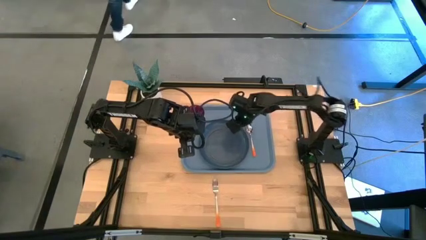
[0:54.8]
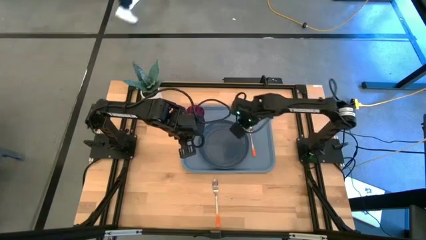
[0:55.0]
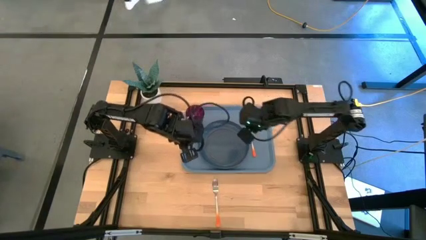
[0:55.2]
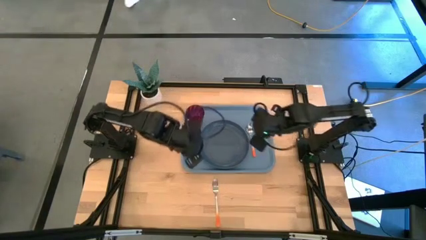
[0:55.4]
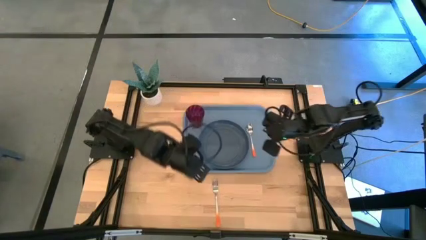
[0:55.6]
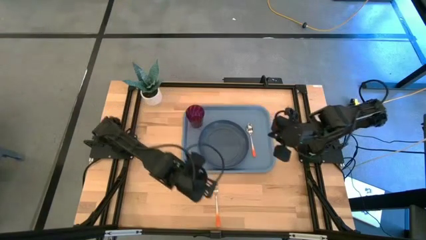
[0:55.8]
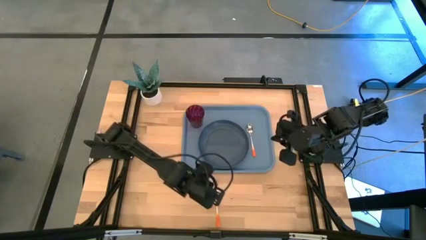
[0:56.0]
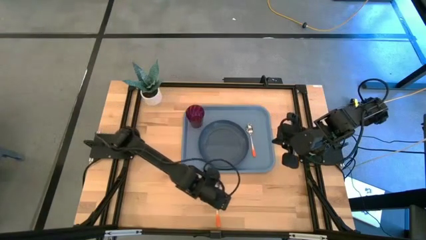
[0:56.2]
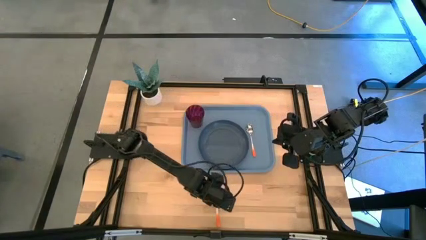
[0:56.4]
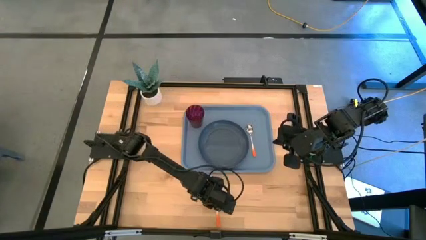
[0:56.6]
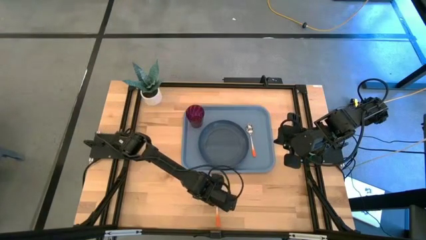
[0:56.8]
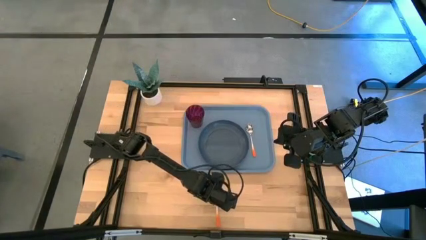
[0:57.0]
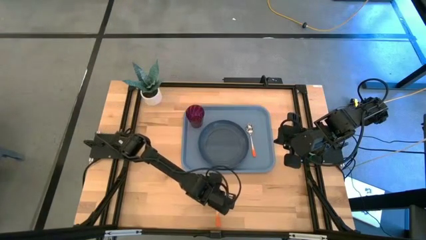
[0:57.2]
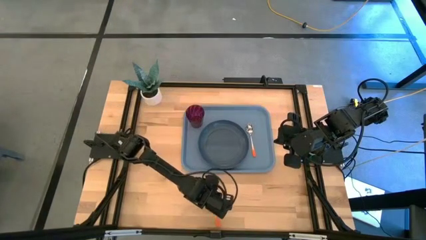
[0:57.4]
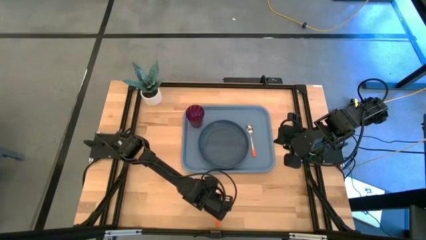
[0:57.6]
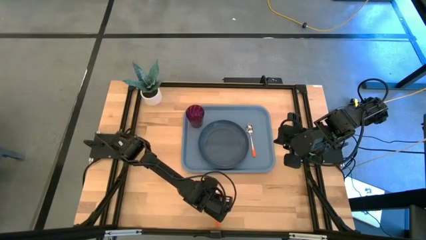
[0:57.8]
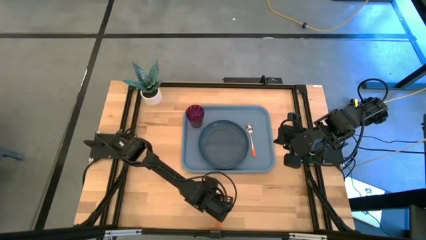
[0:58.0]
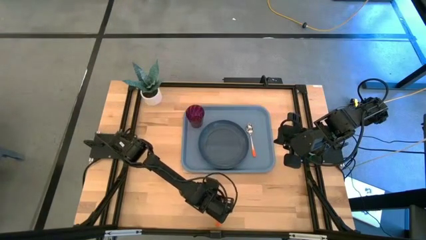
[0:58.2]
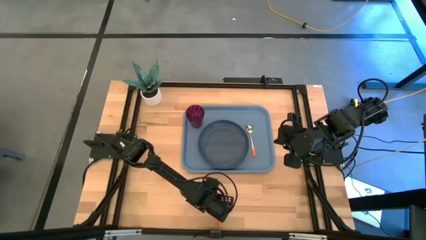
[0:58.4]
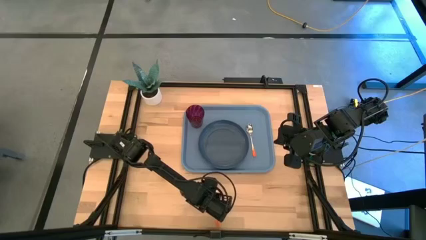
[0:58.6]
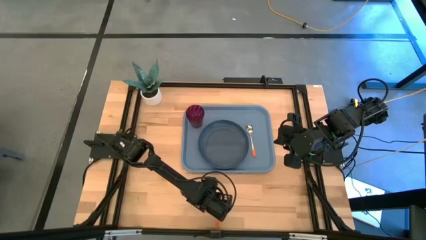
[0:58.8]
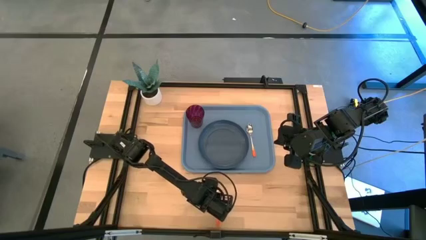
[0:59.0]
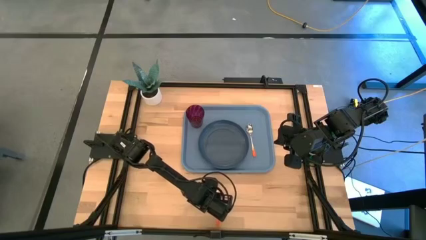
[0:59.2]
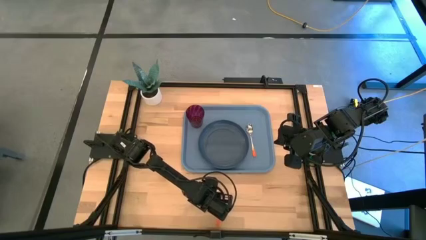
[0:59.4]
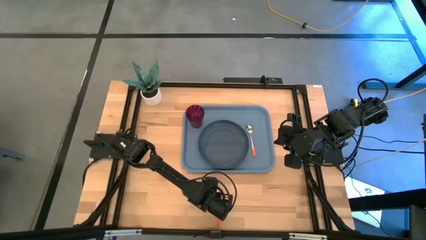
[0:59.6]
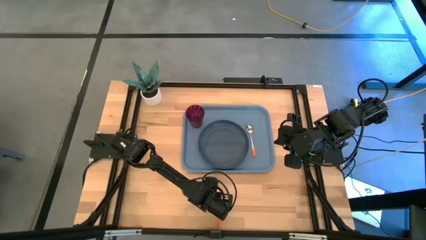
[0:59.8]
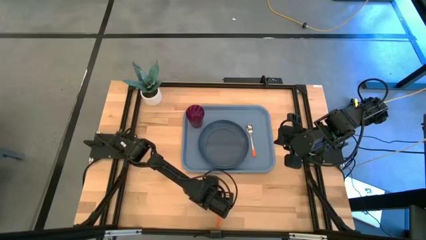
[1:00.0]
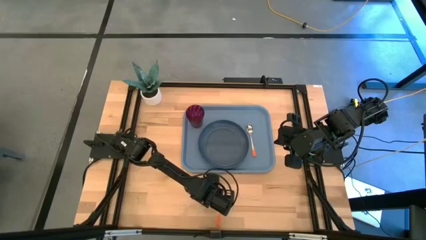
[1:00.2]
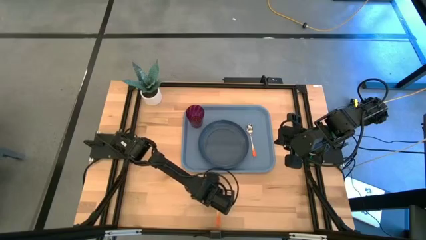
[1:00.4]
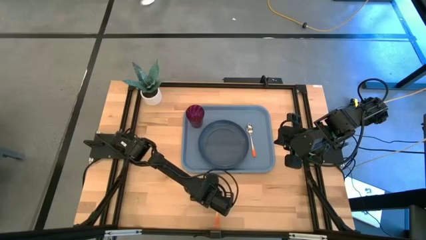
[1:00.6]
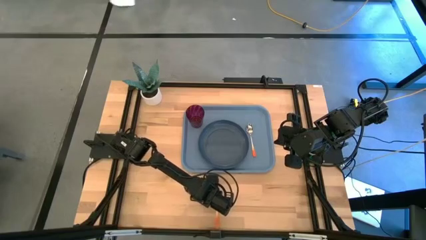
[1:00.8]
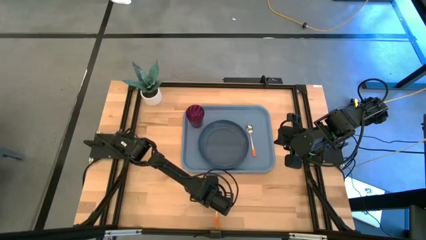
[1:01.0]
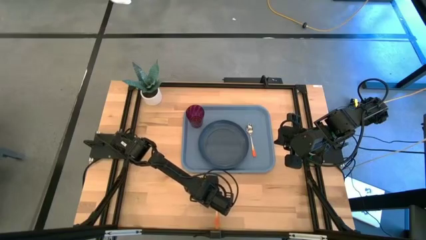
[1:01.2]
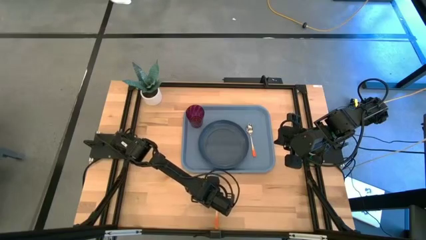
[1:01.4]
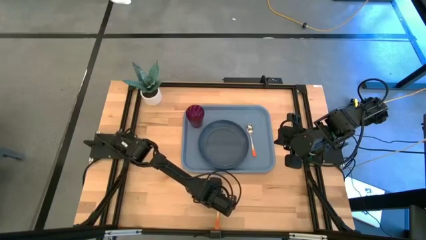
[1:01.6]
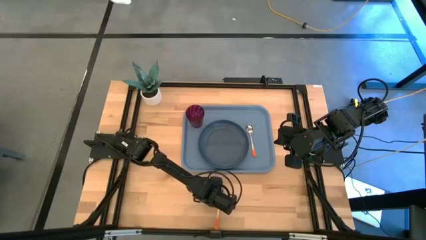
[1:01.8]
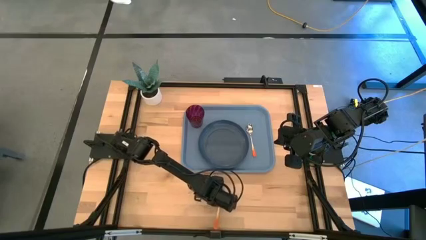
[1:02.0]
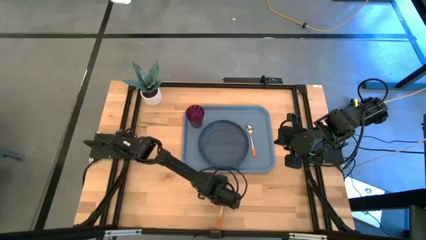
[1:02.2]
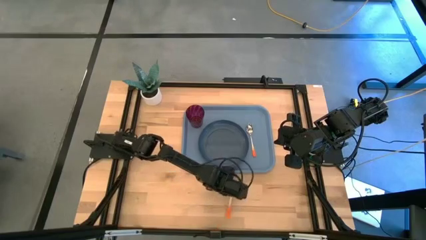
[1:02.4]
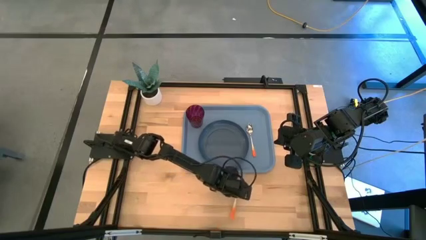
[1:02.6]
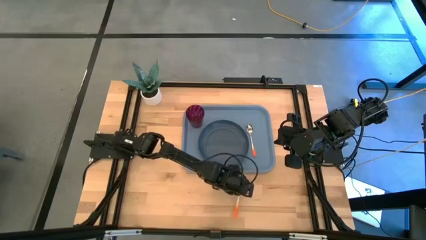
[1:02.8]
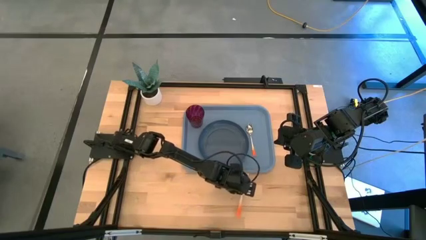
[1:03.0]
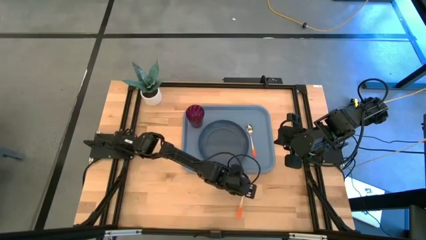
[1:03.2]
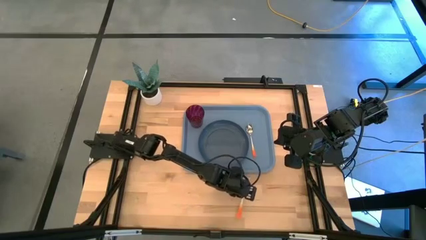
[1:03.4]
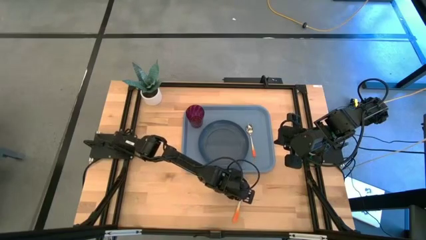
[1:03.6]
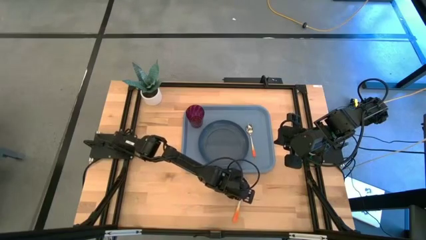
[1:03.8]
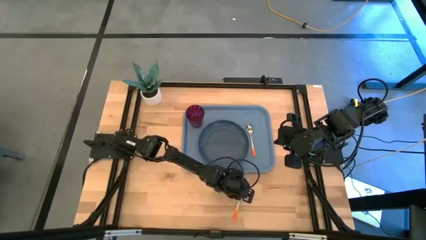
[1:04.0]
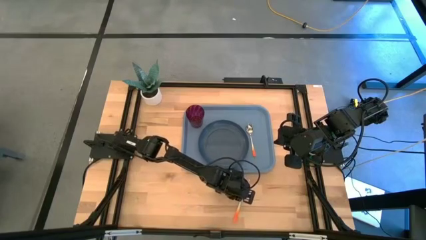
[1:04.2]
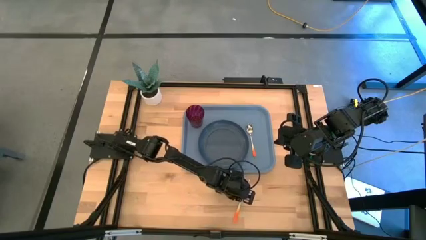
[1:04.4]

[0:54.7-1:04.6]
Task: Pick and place plate/cup/fork/spoon on tray
Put the orange fork to the right of the orange spoon on the light blue tray

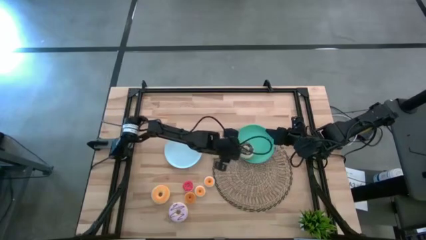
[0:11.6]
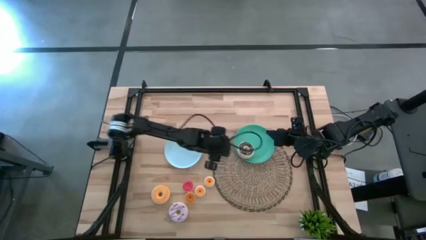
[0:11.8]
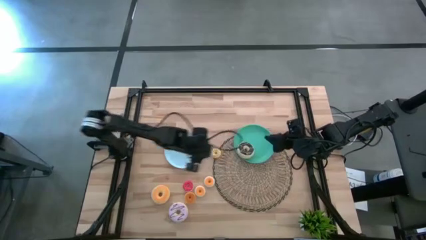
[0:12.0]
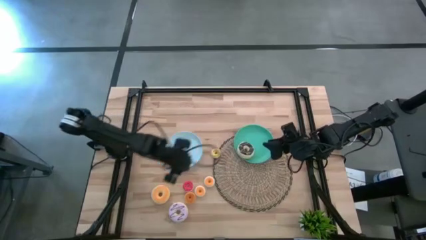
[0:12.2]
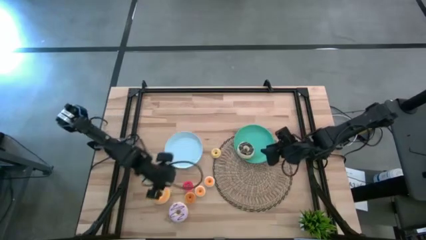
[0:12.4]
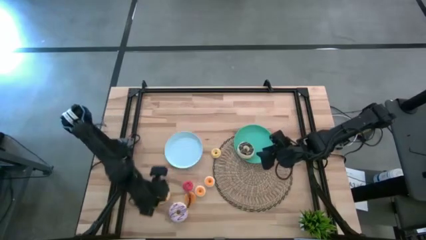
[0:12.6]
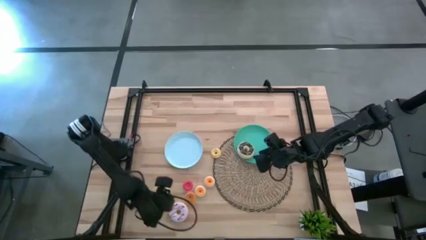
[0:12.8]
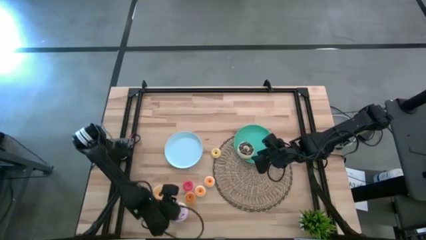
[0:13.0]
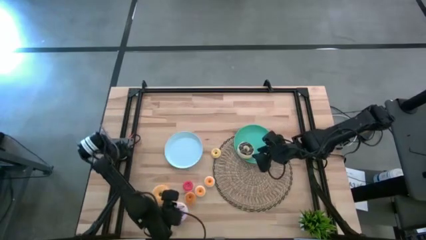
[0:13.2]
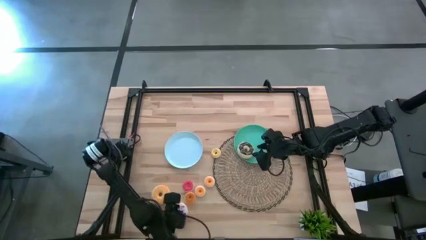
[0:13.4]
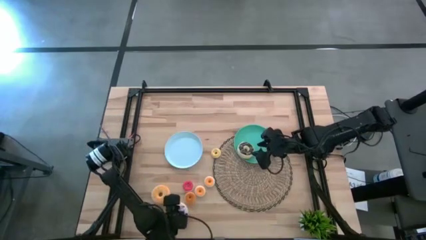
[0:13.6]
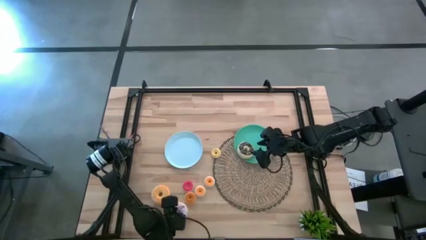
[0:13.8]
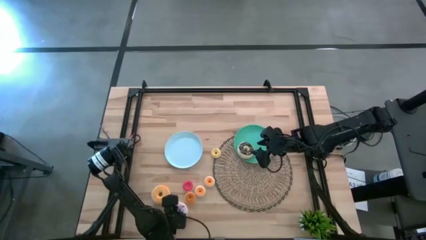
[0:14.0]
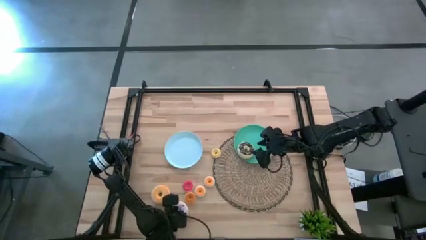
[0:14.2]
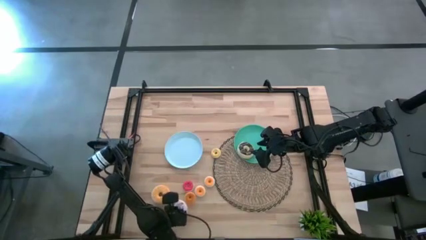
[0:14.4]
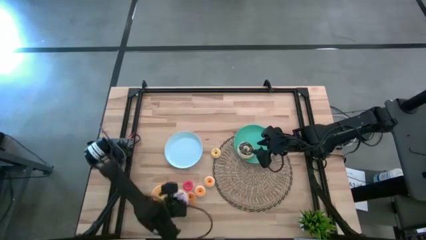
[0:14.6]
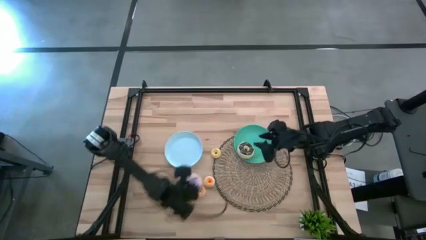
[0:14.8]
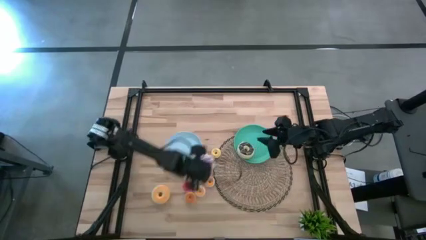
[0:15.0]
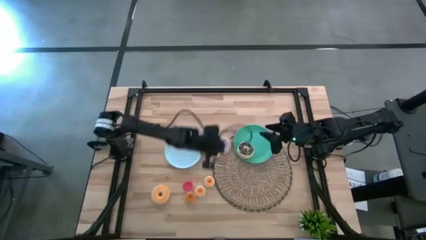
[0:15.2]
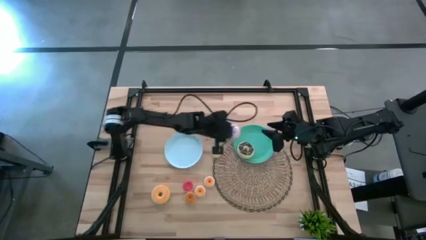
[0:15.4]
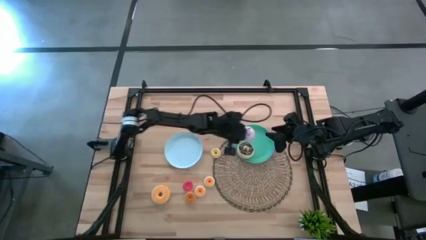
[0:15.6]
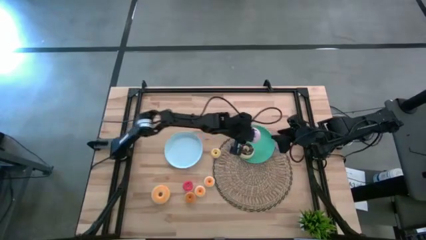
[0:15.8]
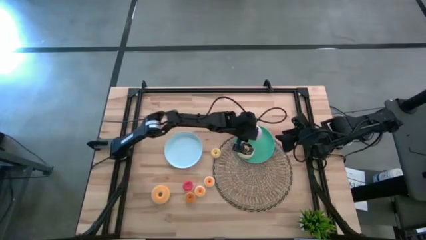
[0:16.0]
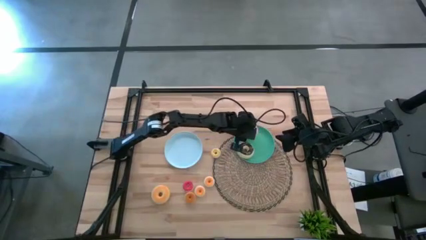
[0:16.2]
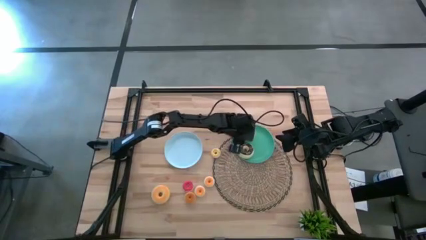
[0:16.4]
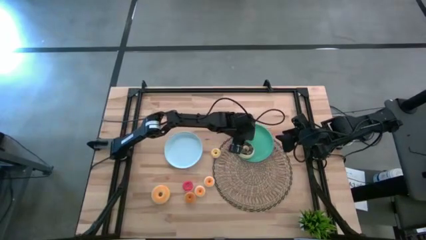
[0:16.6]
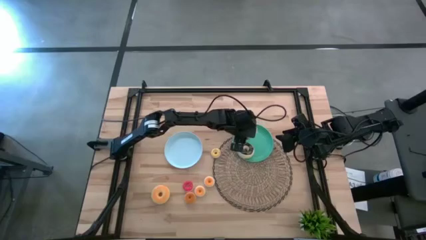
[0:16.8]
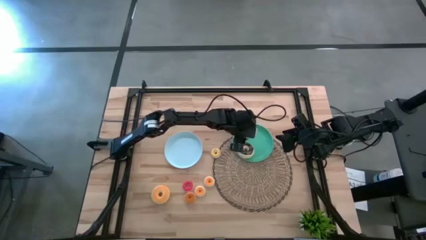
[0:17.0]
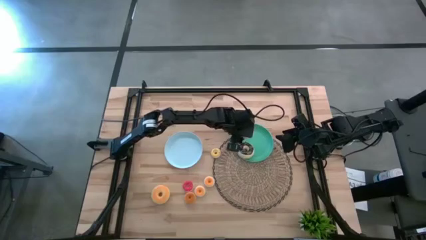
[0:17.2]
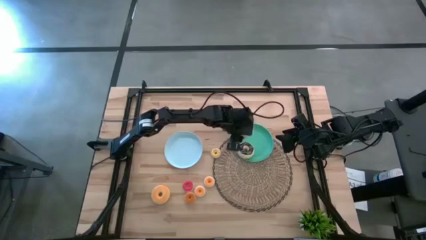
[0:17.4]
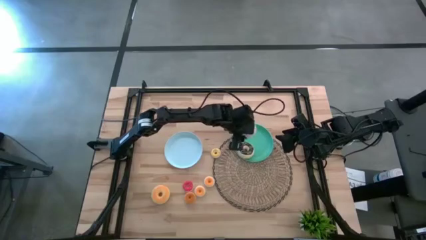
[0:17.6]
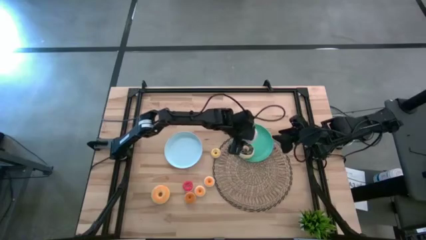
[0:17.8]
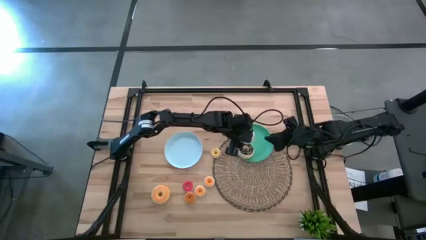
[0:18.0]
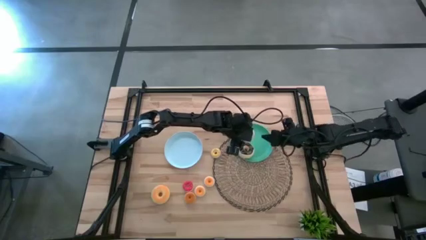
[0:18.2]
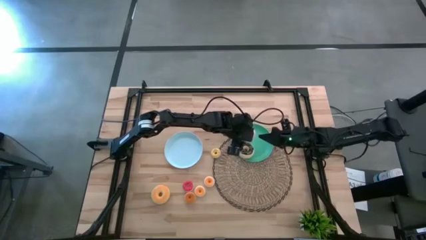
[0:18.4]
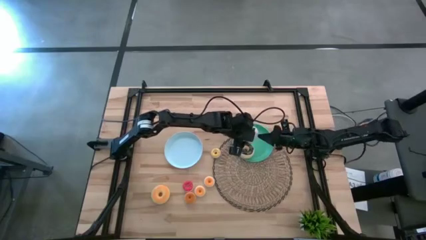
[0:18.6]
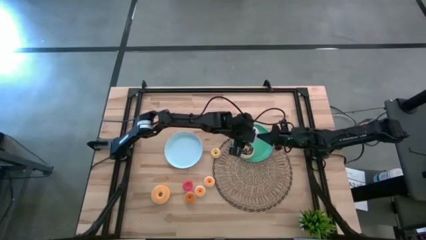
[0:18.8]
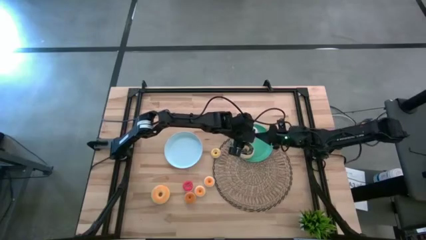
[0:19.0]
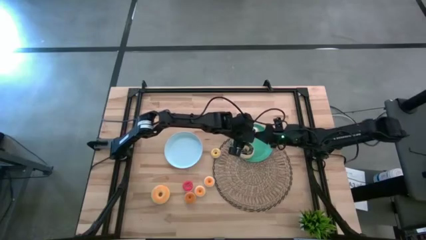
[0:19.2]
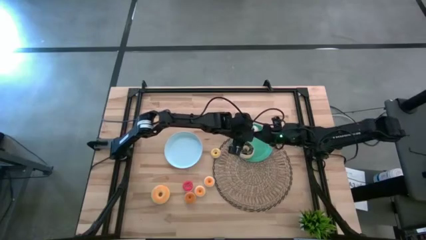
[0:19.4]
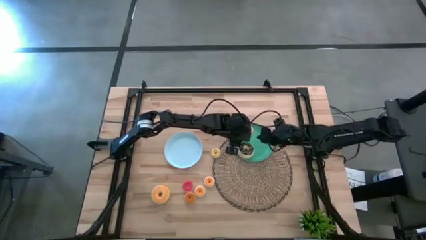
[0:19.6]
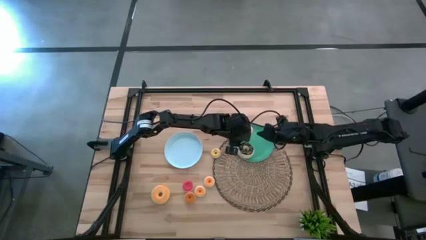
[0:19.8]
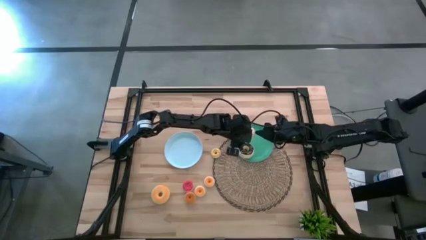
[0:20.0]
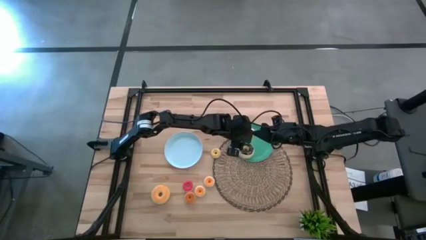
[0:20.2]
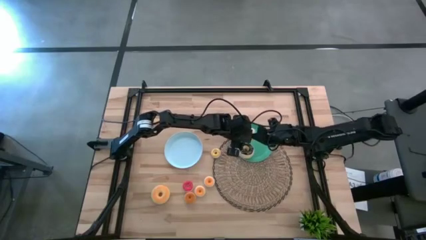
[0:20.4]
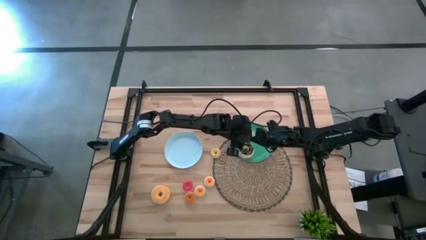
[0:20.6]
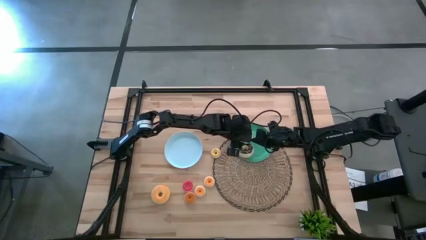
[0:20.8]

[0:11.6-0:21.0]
Task: Pick & Place donuts
Put the purple doughnut on the green plate
